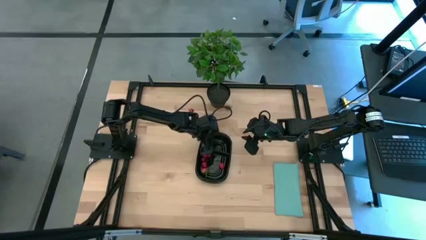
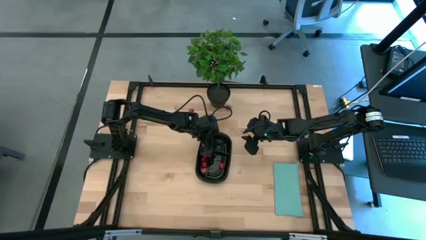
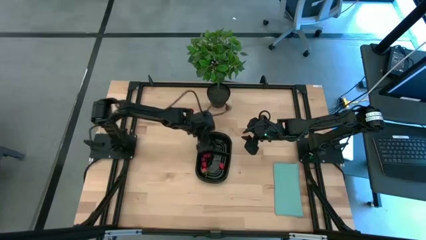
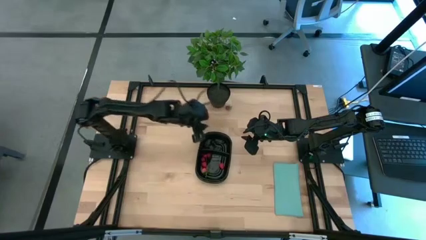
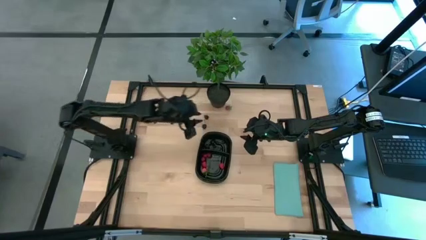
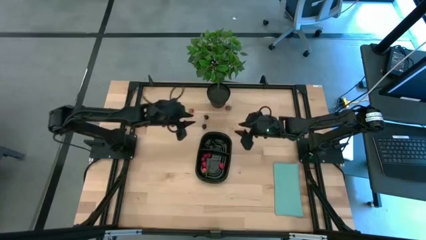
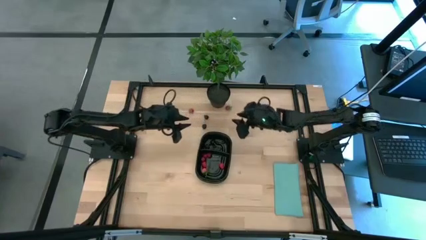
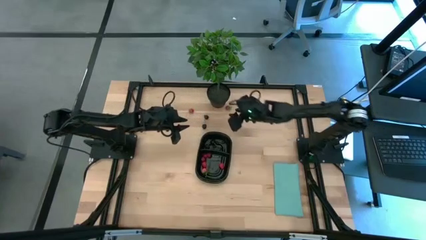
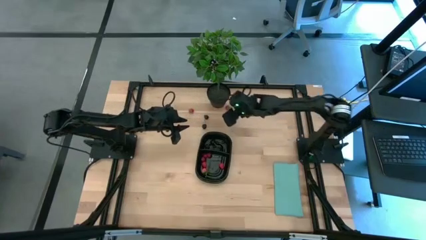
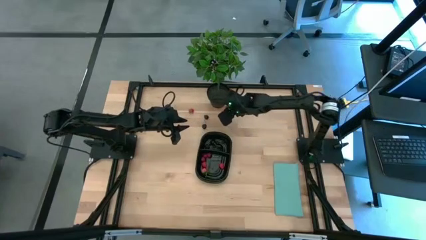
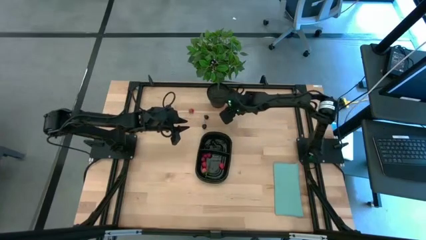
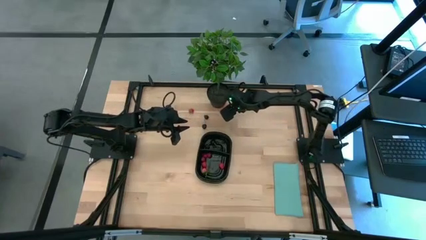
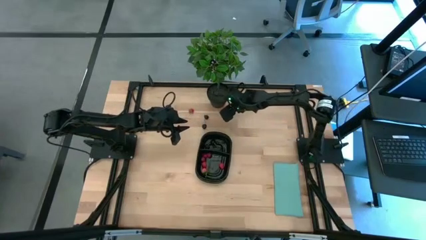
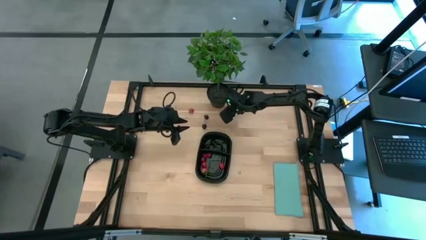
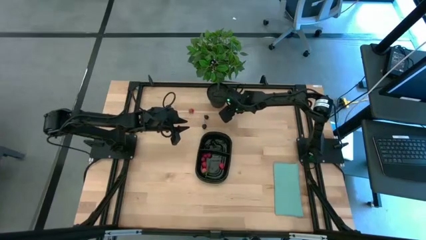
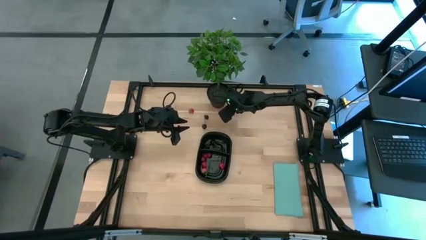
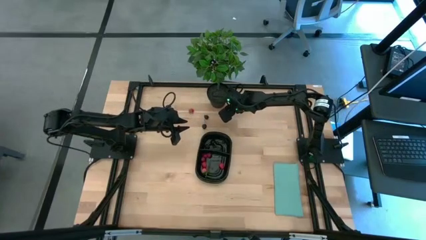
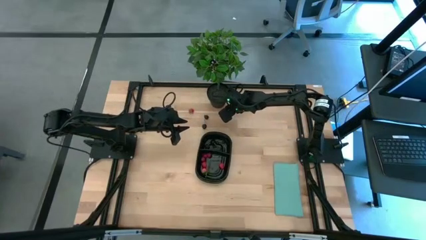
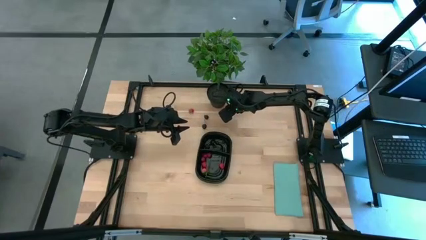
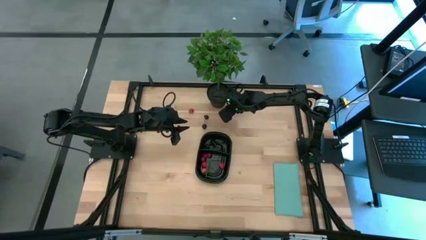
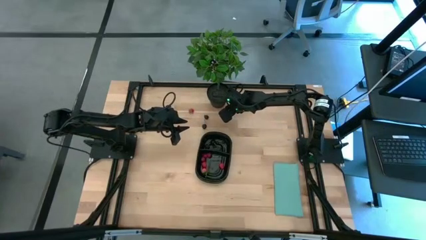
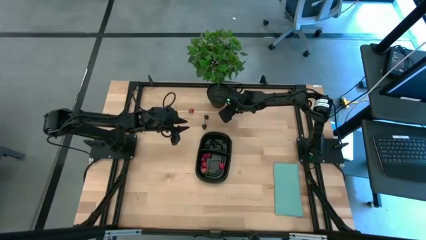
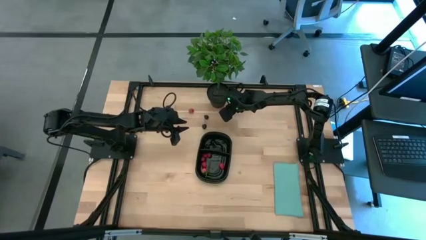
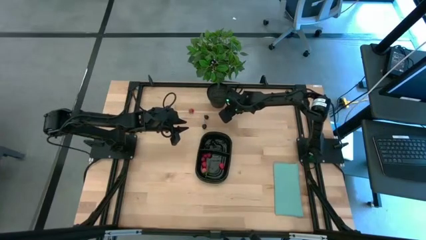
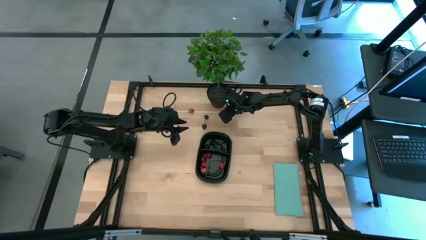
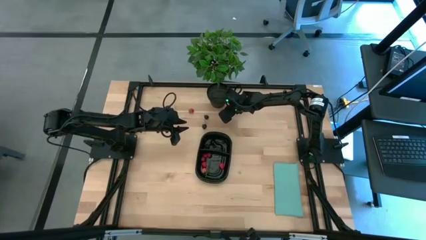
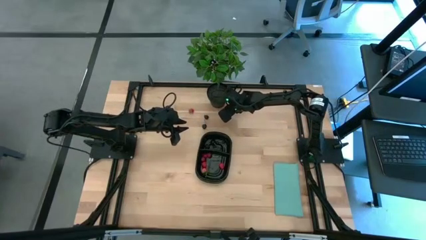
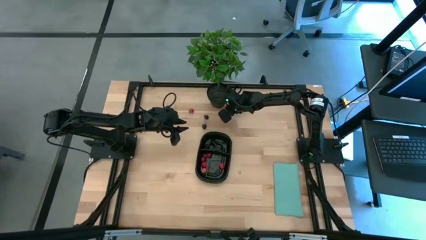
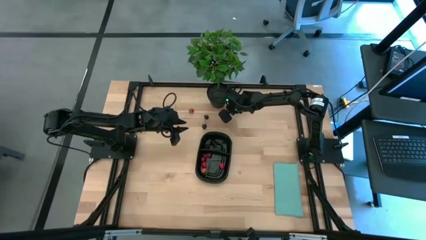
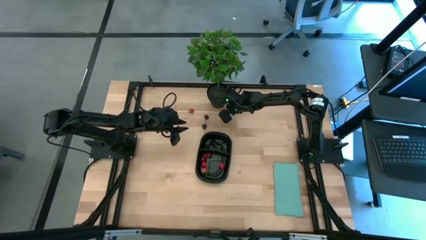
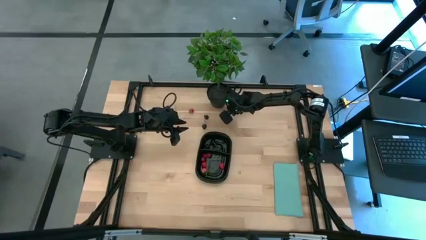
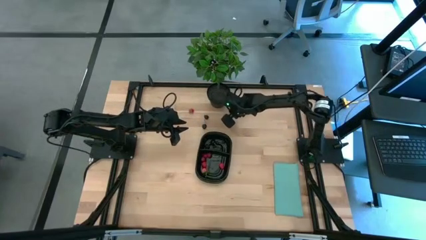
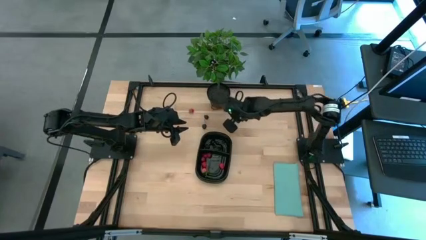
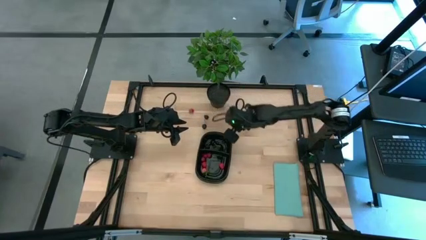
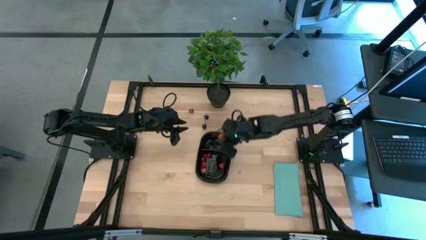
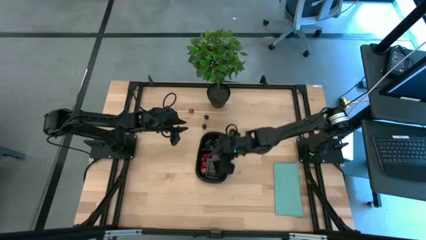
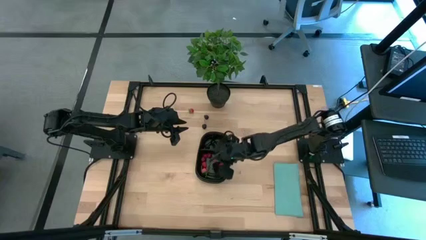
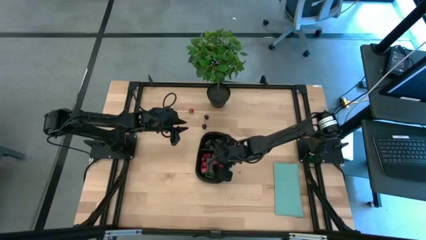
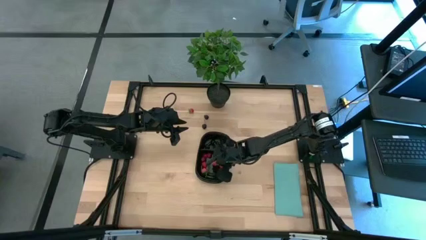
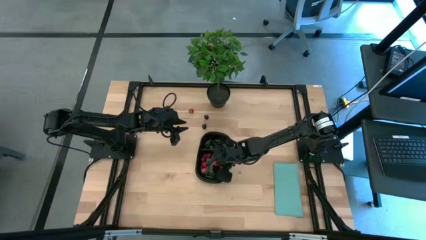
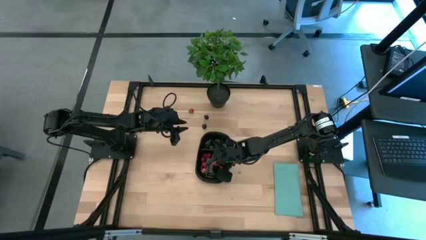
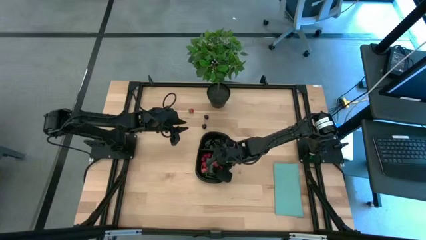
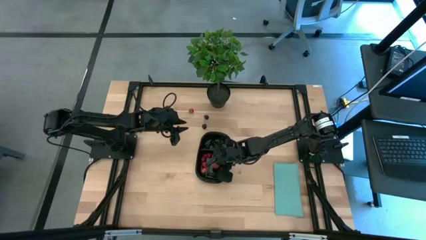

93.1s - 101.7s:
Task: Pick and placing Produce into tupperware
Put the right red strawberry into the black container with the other red fruits

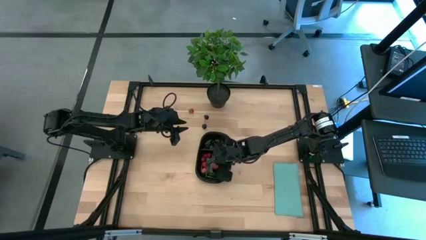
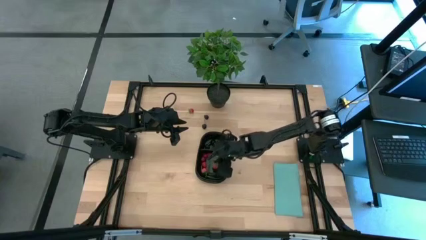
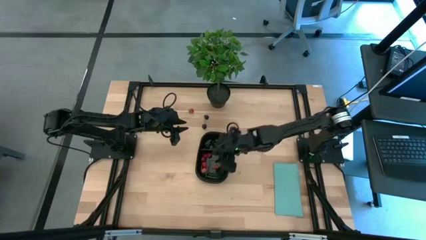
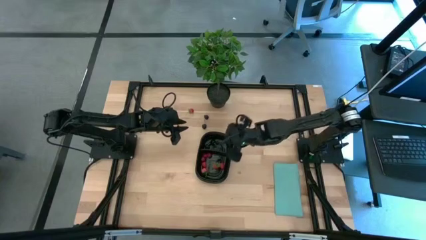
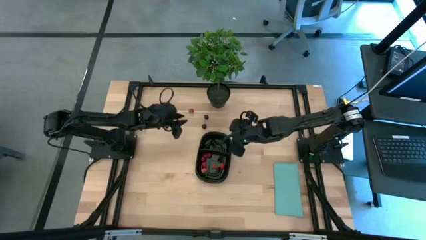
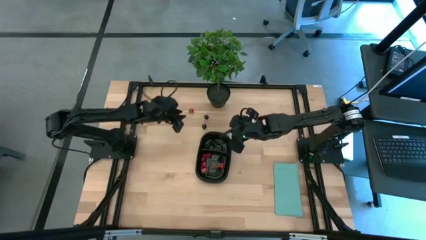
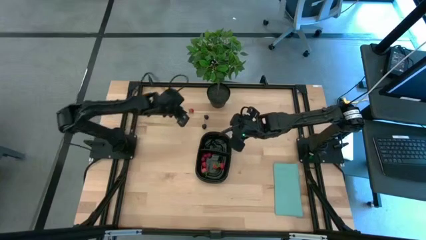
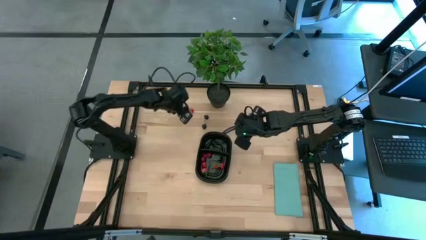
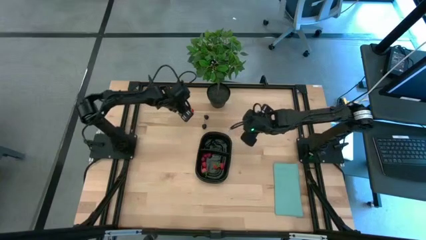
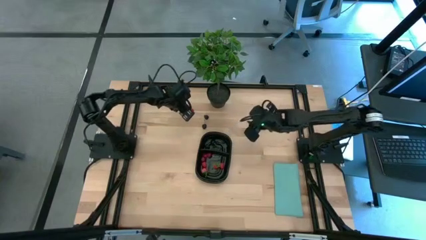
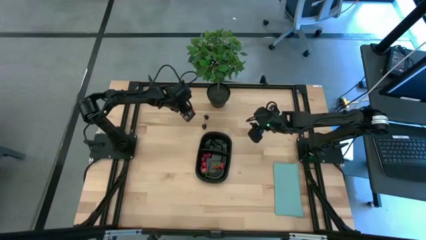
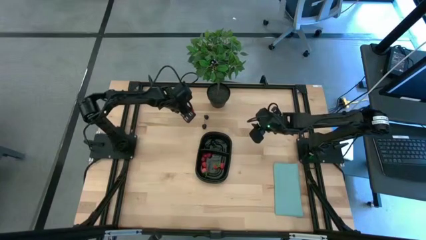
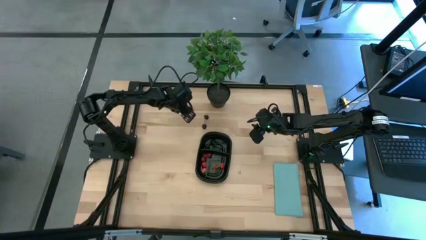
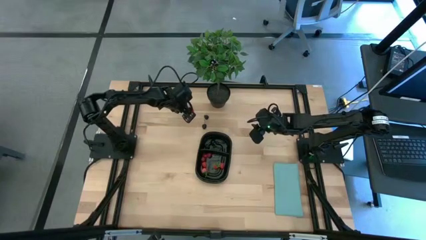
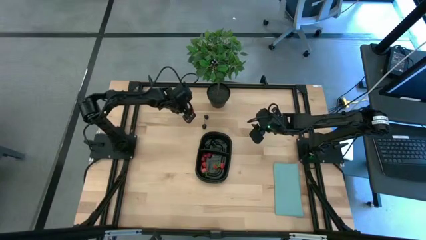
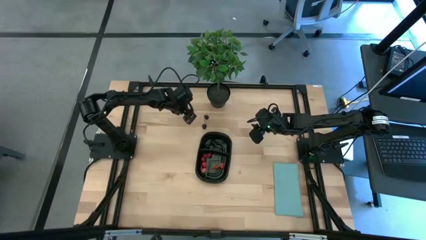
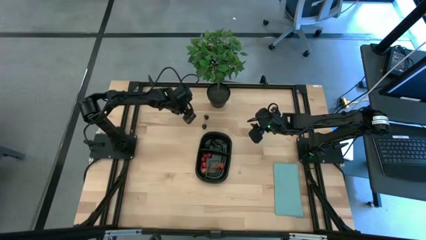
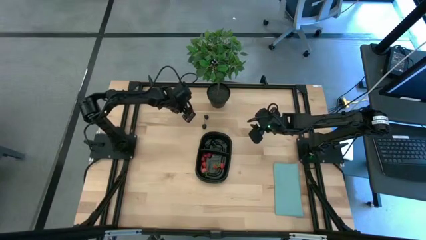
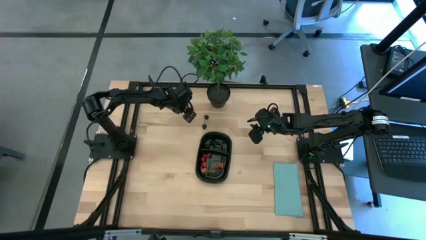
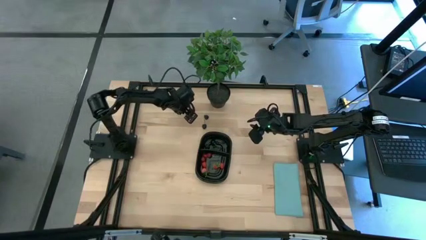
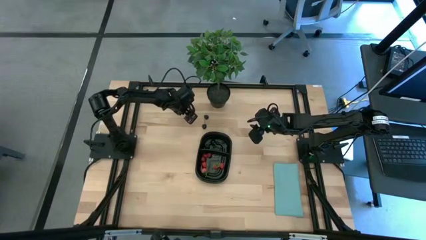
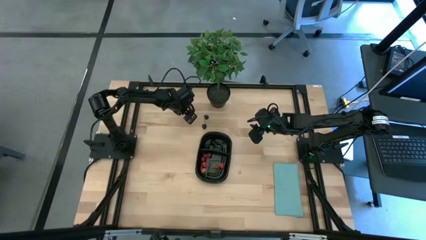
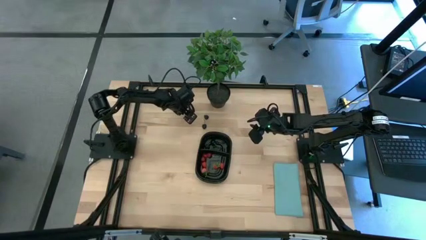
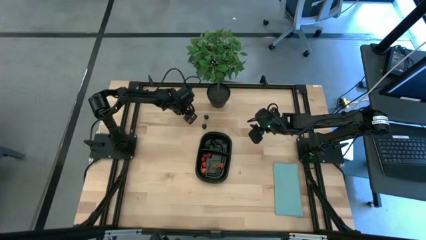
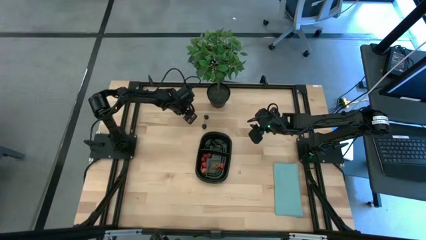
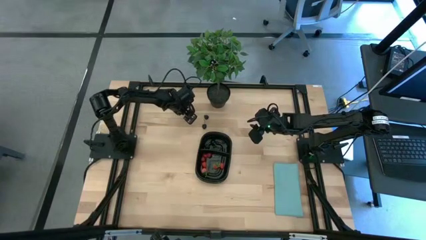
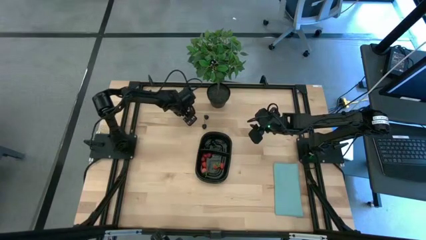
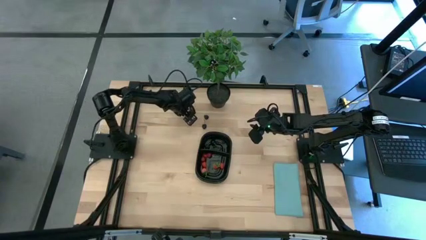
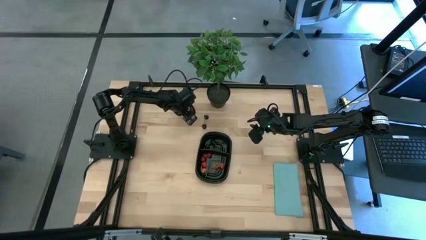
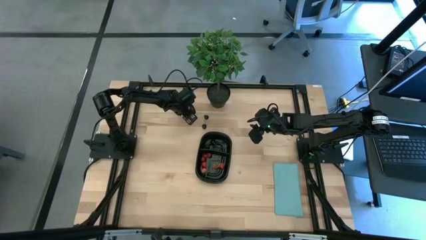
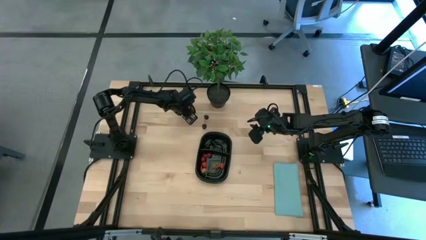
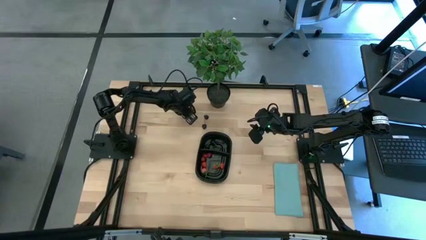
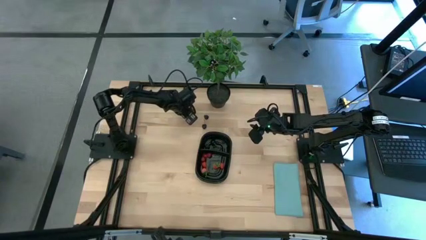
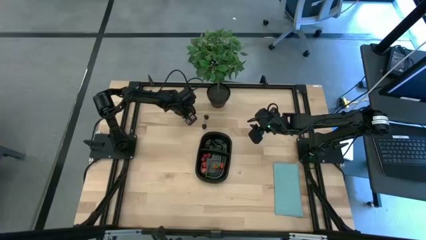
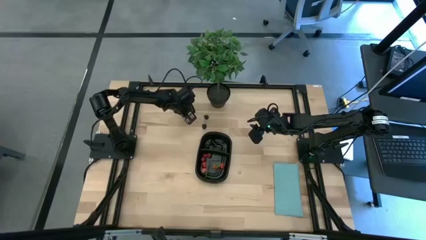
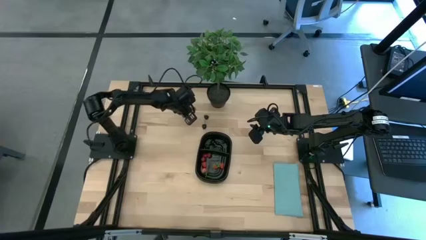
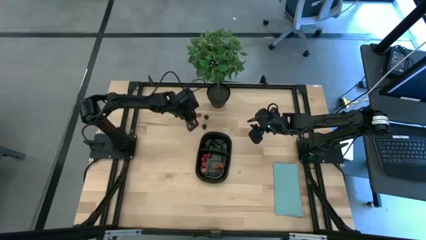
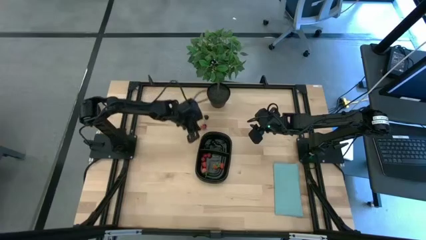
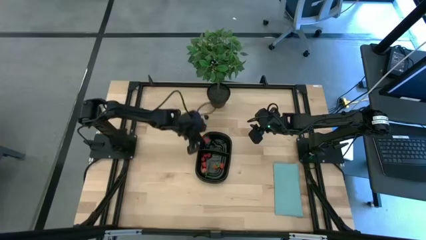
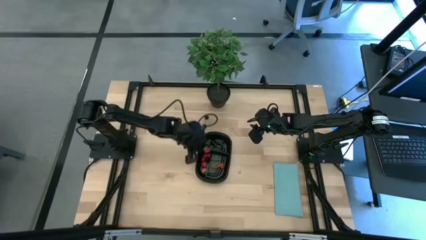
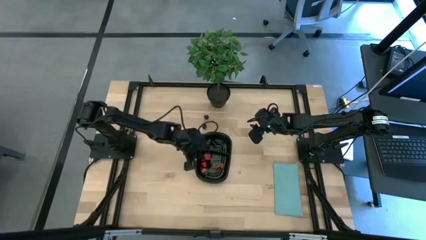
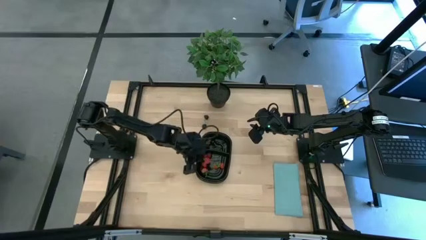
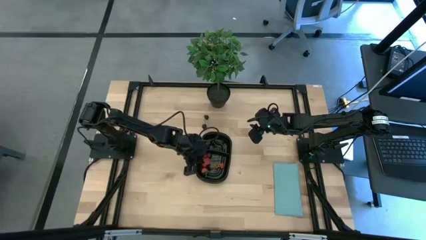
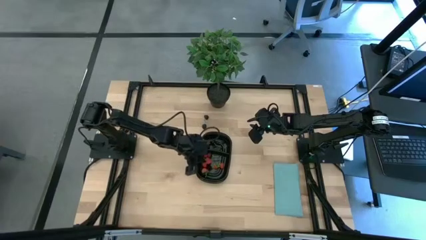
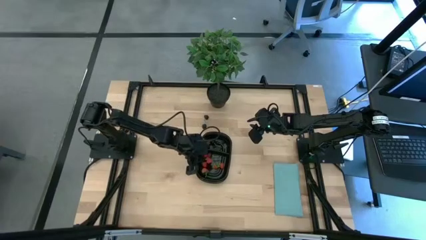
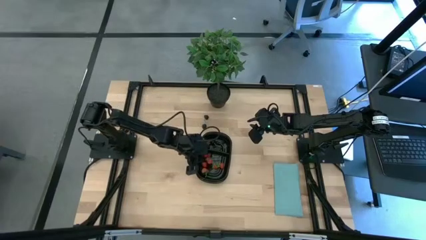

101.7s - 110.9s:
Put the red strawberry into the black container with the other red fruits
